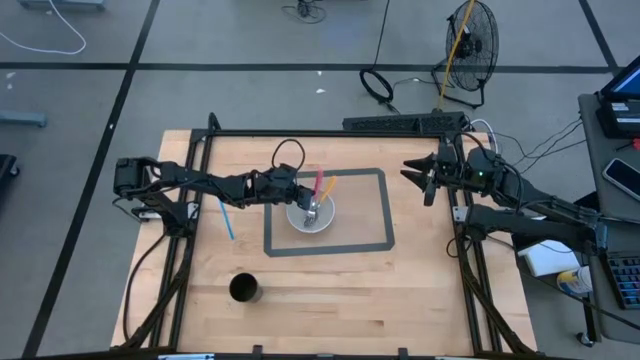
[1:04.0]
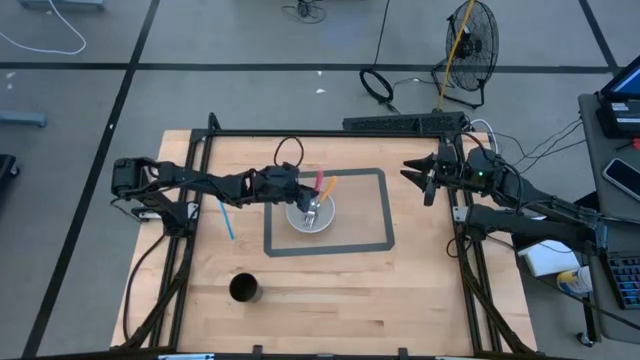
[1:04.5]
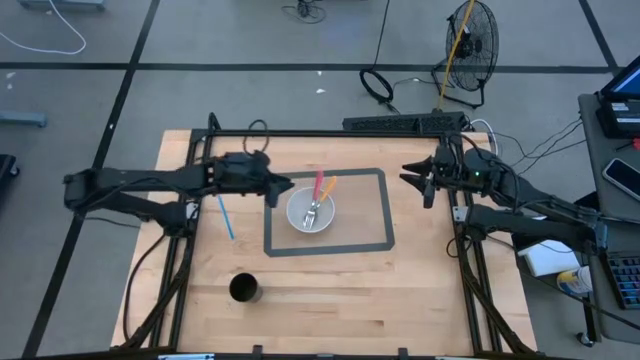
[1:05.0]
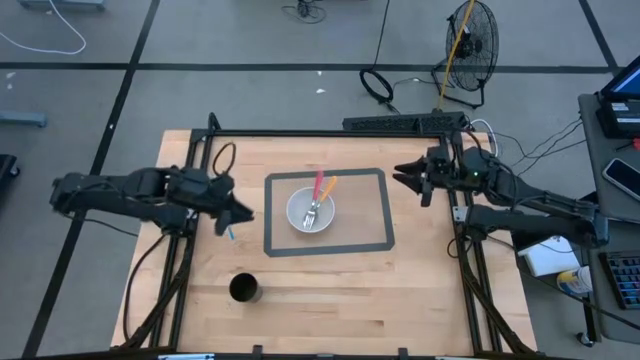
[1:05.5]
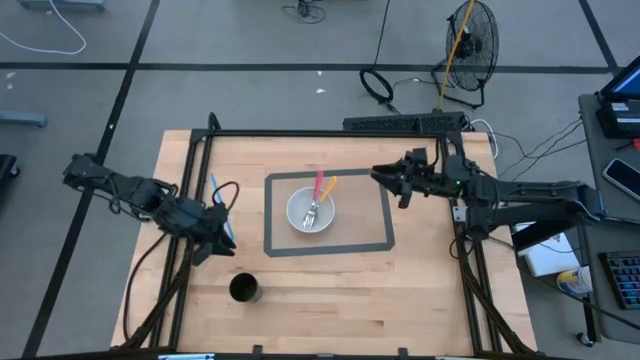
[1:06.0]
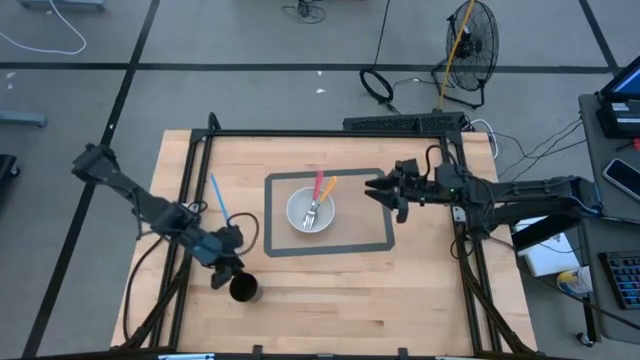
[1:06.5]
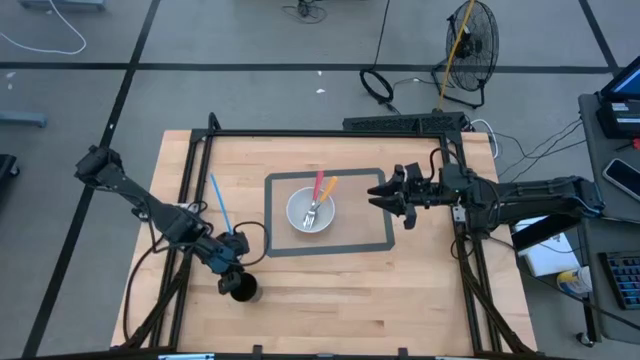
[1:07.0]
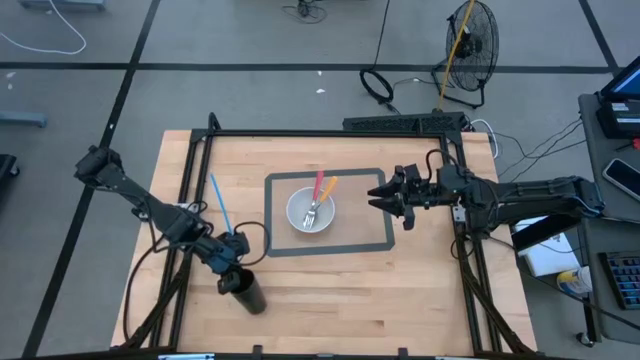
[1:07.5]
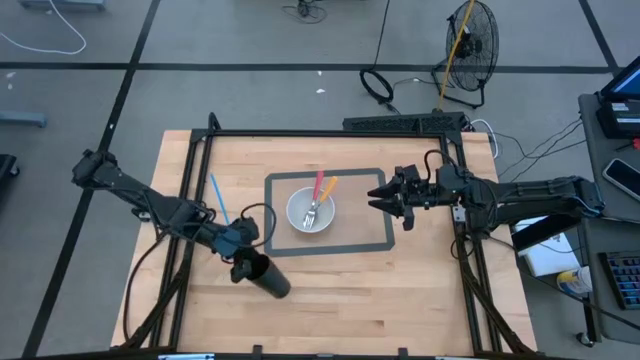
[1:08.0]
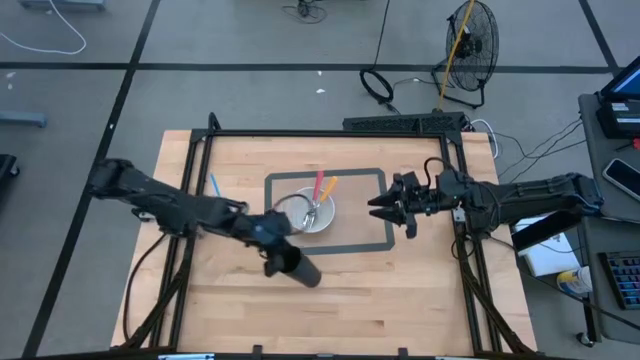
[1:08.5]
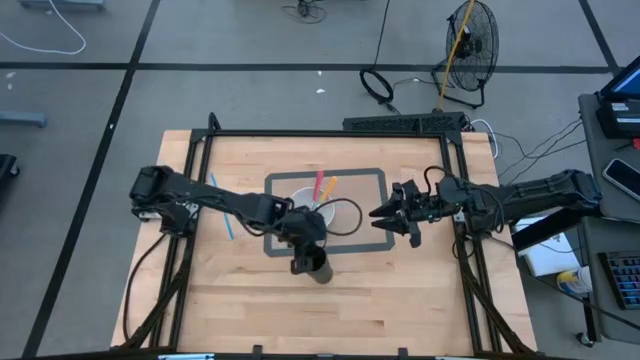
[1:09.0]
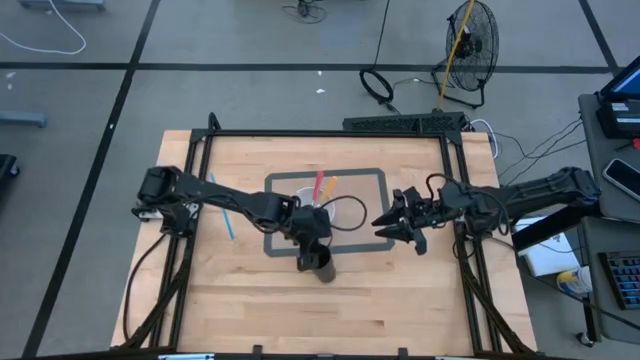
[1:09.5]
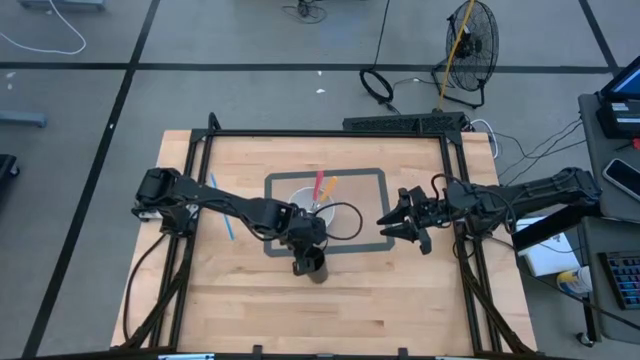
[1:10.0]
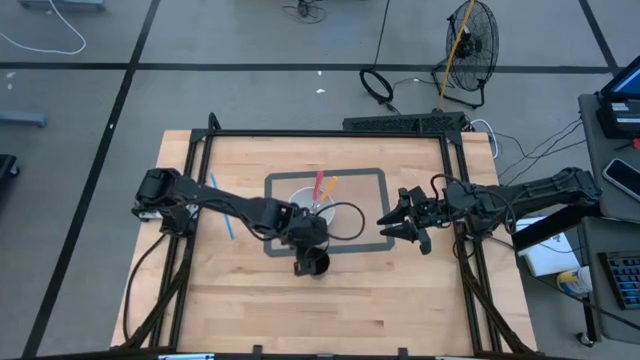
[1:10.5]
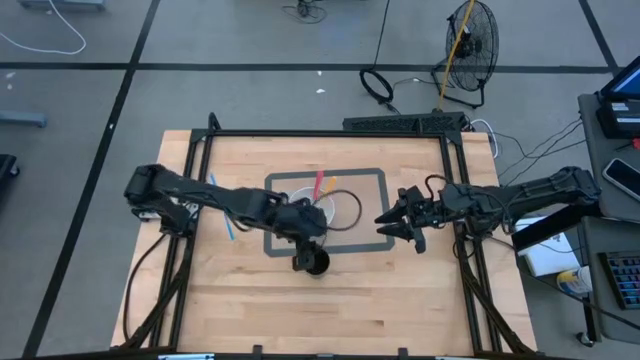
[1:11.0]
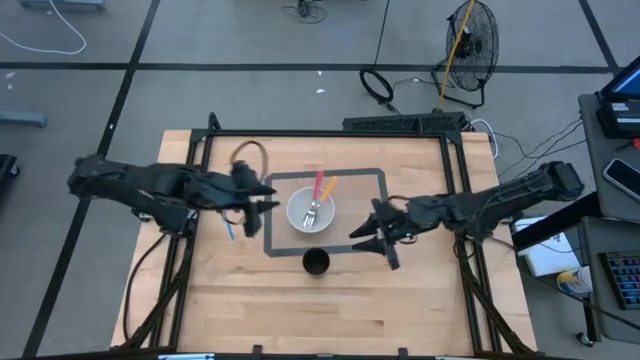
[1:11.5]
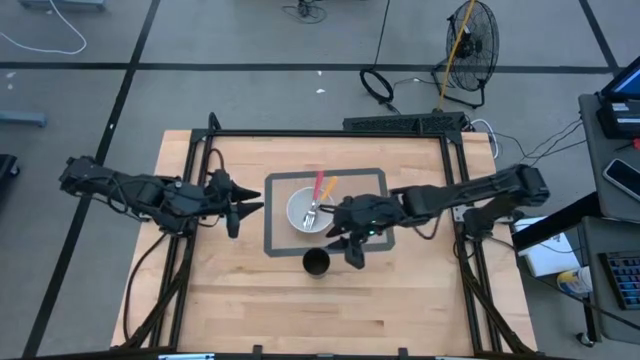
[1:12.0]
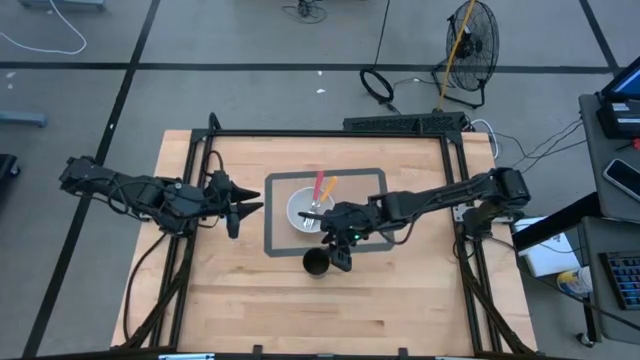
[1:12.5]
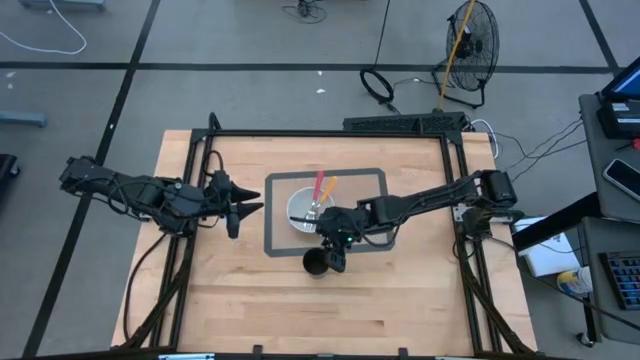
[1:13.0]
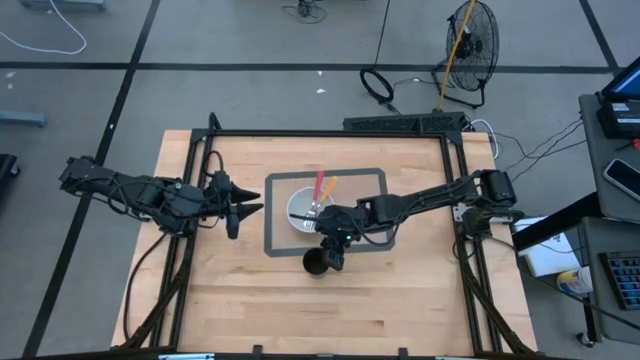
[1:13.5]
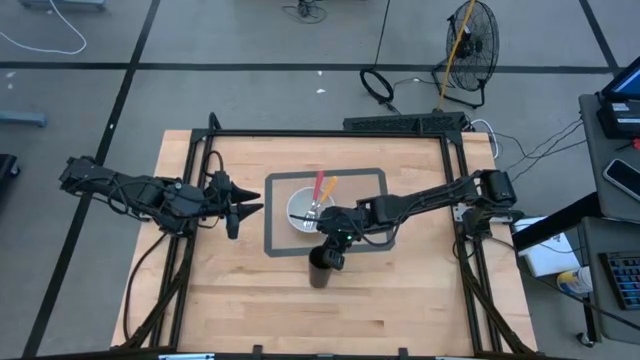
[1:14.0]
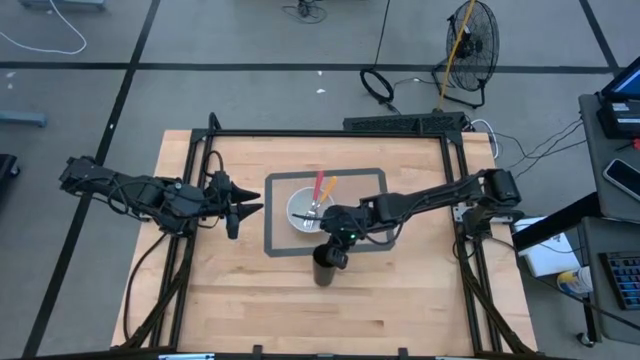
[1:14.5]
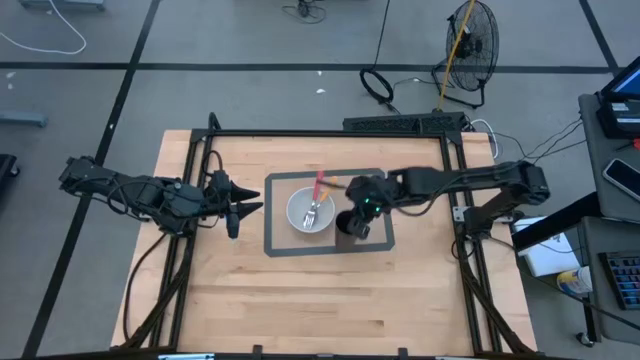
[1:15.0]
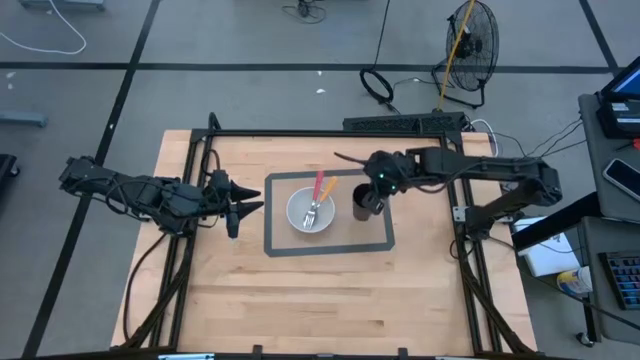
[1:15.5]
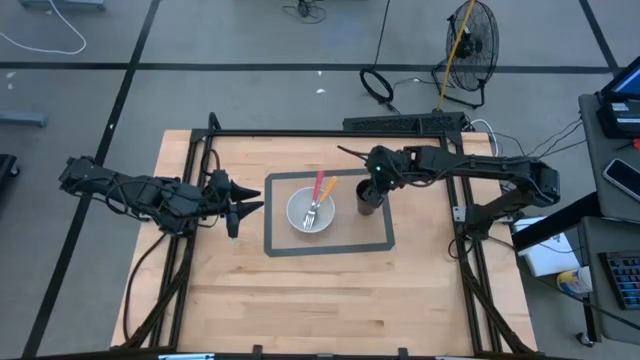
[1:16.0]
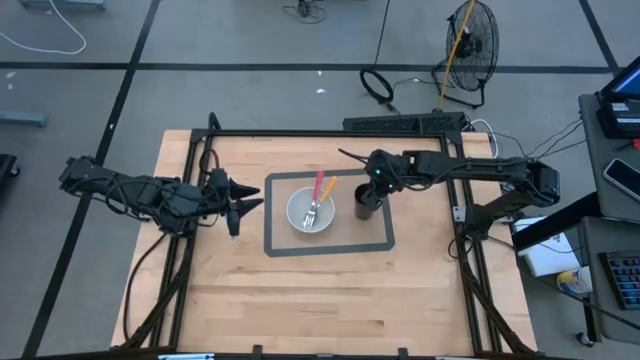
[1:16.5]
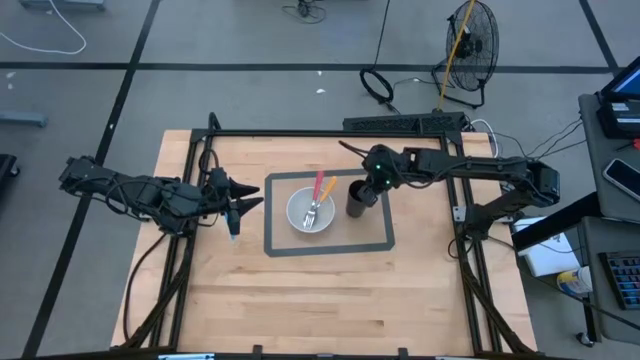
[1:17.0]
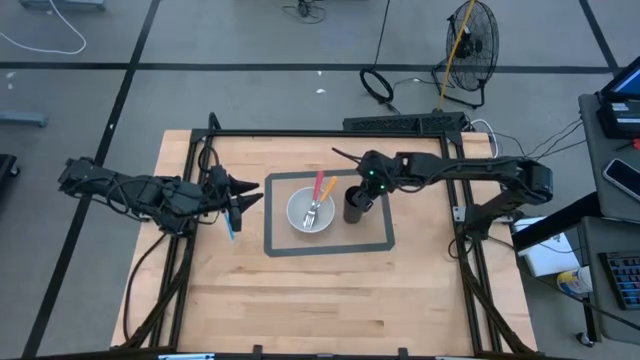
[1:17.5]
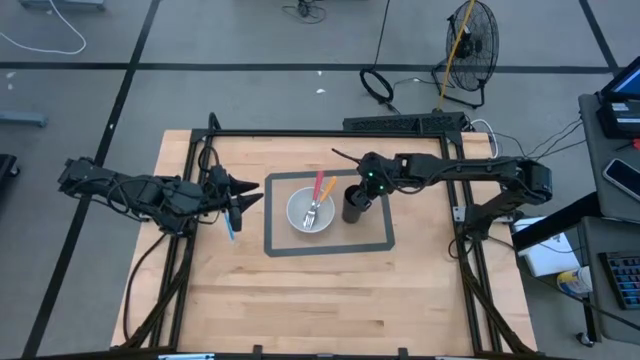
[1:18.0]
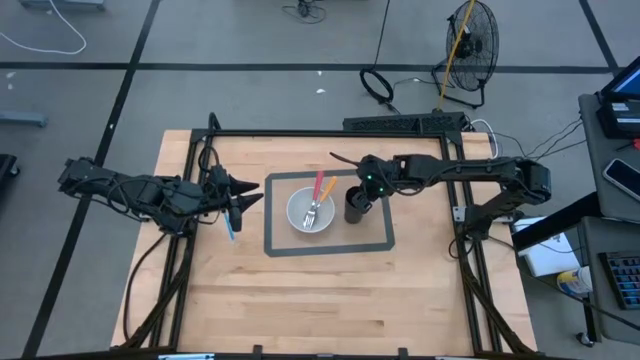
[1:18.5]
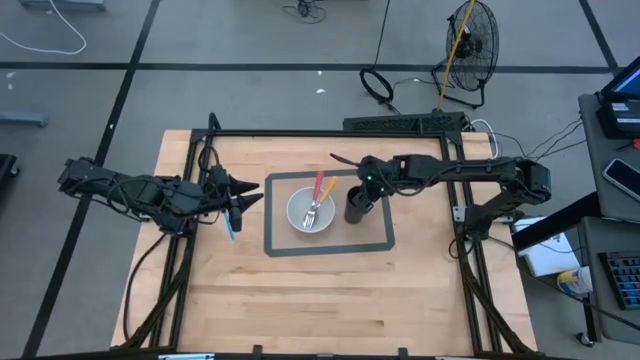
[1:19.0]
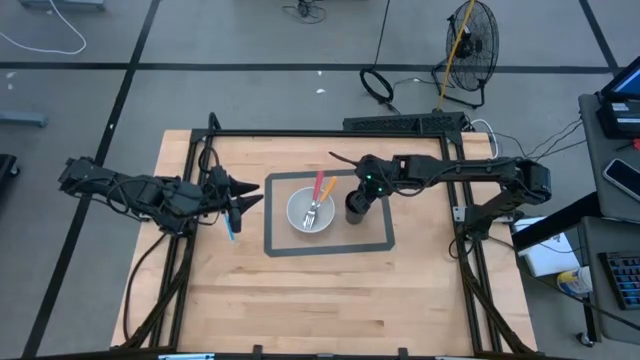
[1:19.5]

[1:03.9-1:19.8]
Task: Pick & Place Utensil
Put the black cup at the right side of the bowl on the table mat

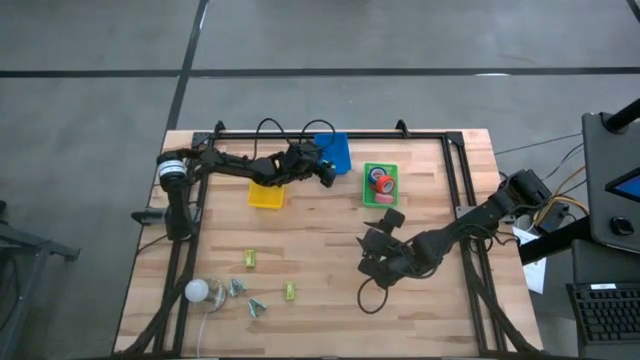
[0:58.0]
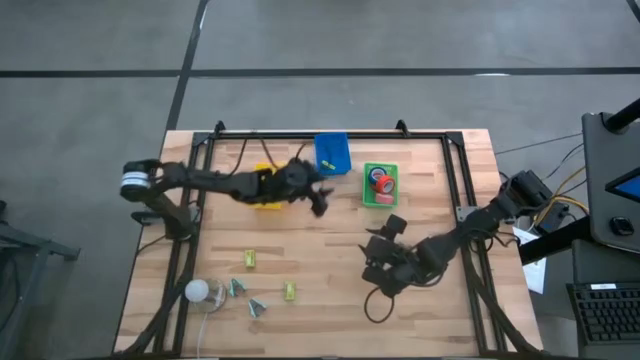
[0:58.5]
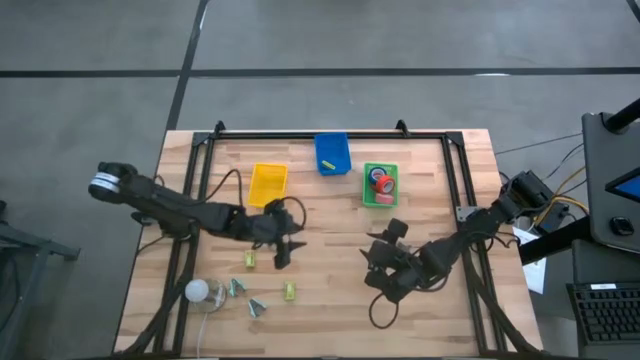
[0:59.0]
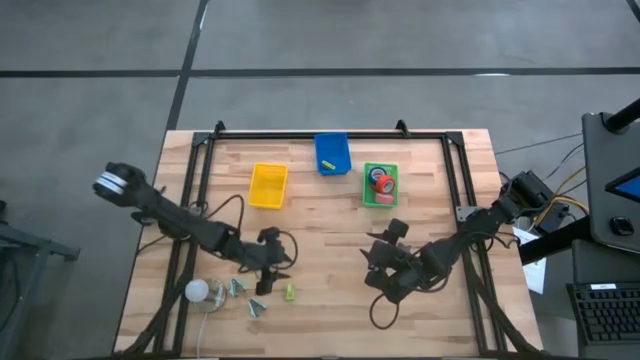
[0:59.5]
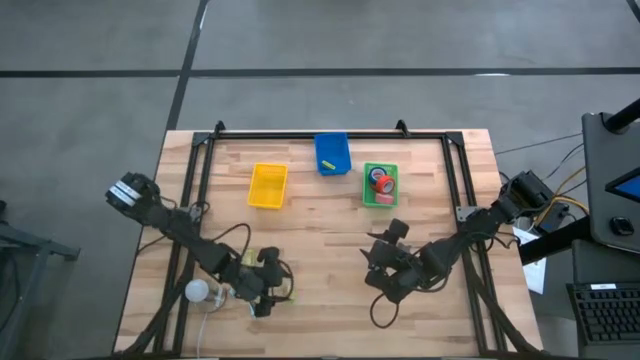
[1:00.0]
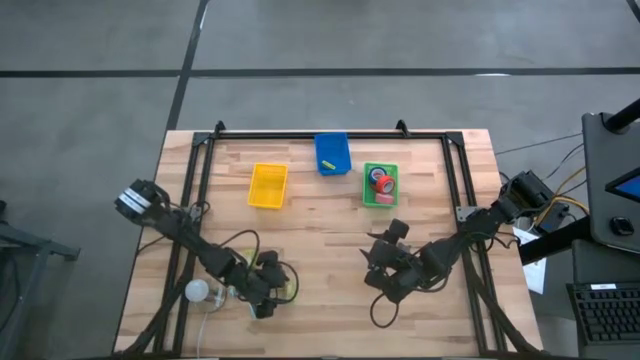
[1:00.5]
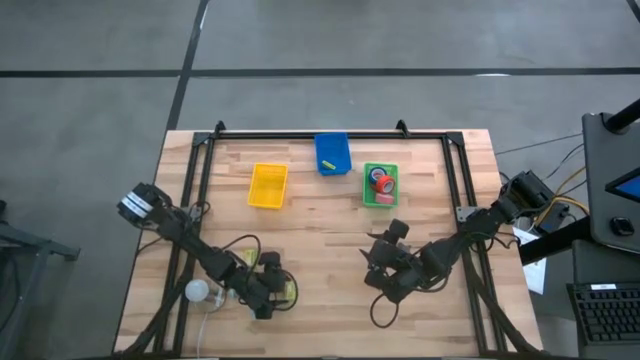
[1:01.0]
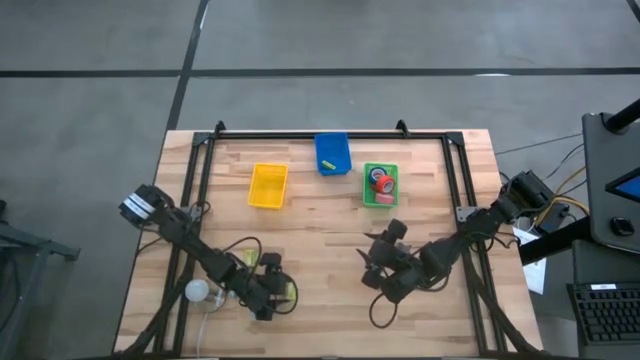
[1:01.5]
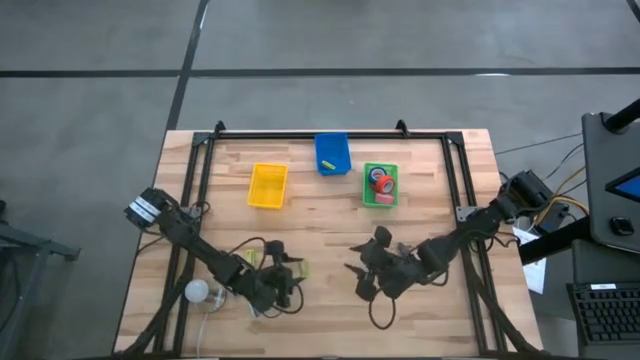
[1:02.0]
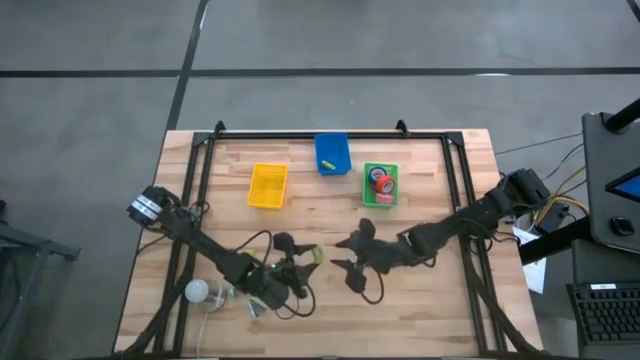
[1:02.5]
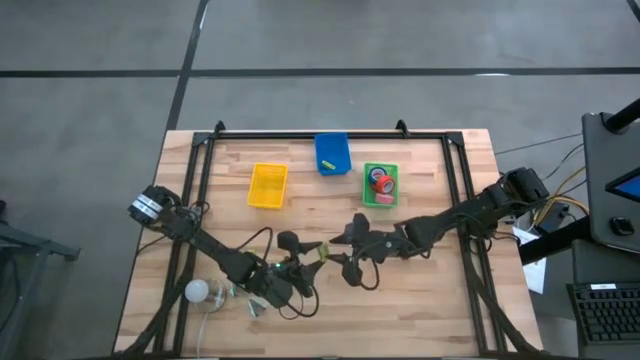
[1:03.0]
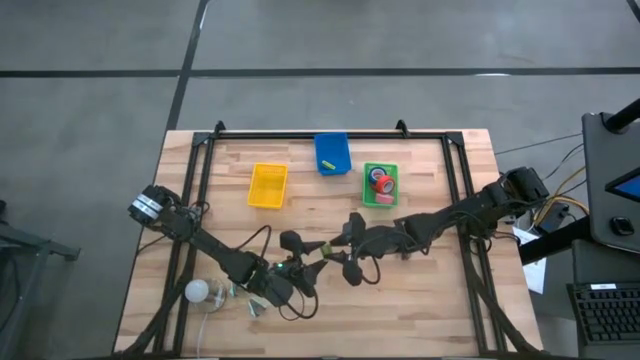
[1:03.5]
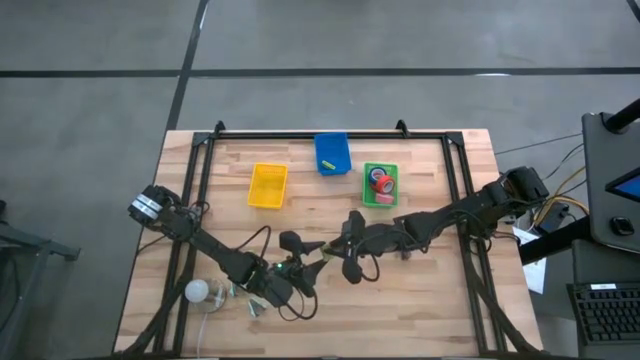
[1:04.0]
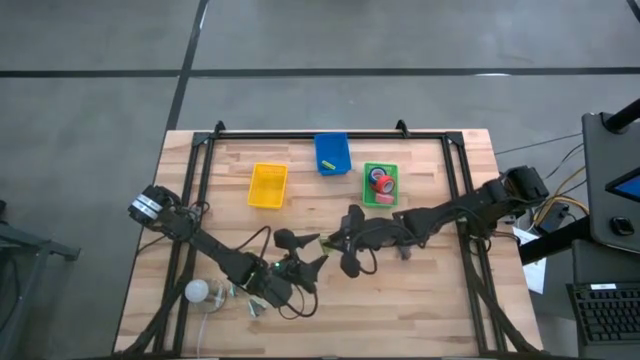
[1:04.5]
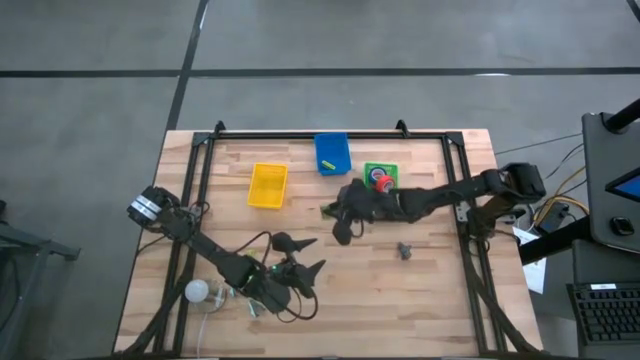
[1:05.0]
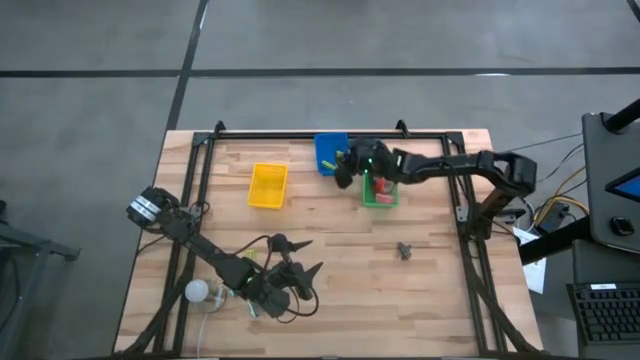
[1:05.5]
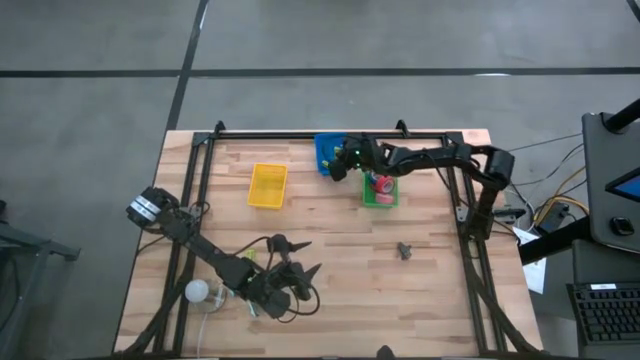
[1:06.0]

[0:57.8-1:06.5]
Task: Pick and place Stapler, Stapler remover, tape
Put the bottom green staple box into the blue basket
